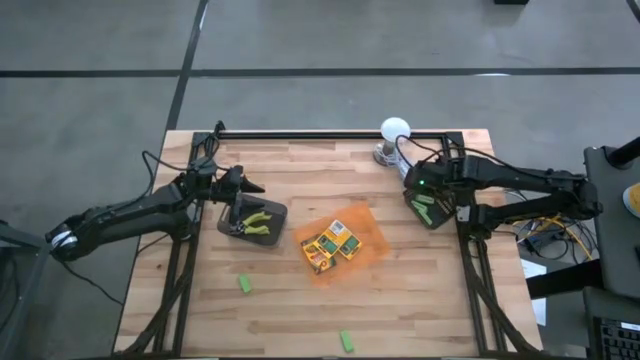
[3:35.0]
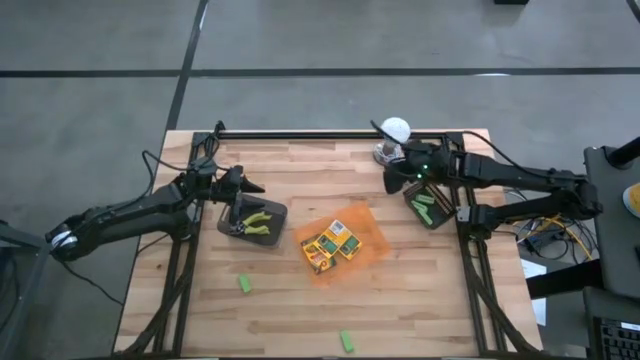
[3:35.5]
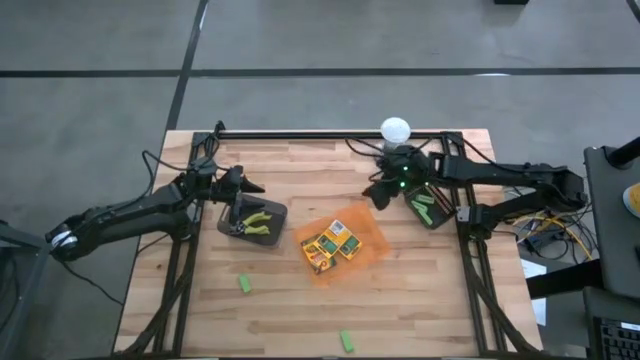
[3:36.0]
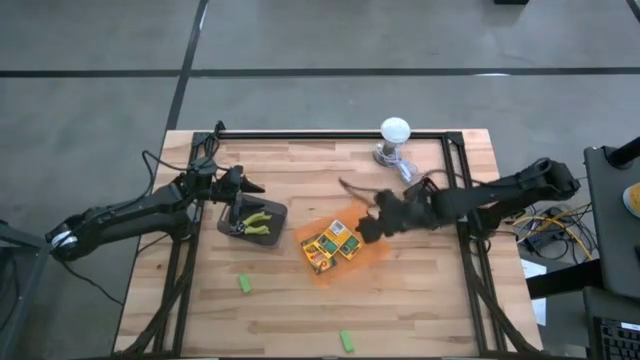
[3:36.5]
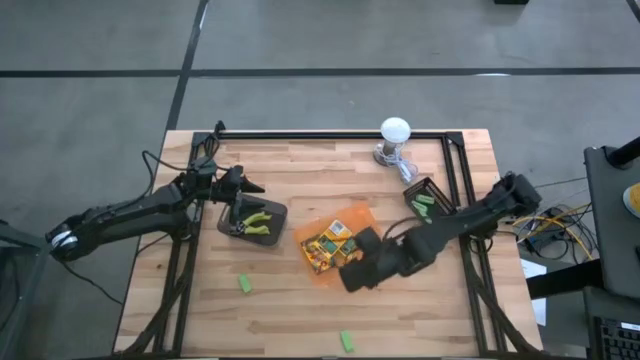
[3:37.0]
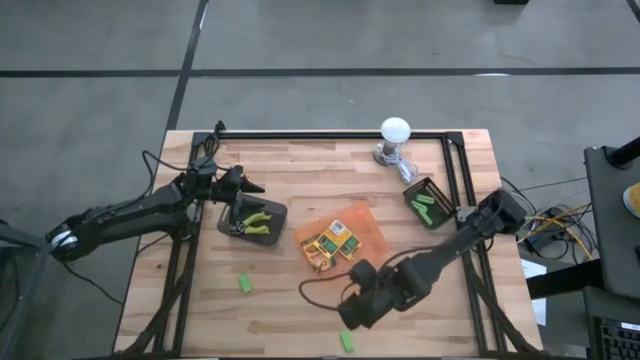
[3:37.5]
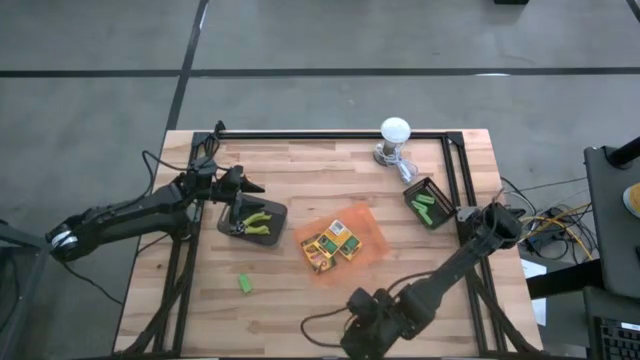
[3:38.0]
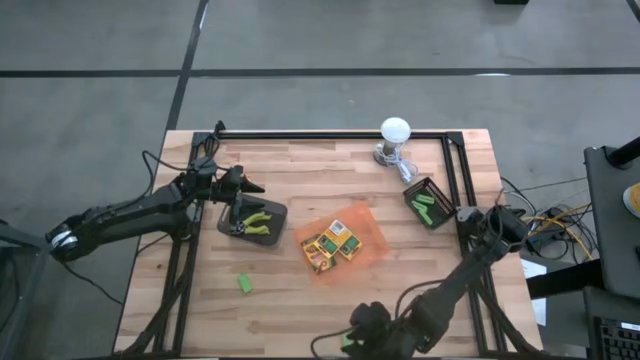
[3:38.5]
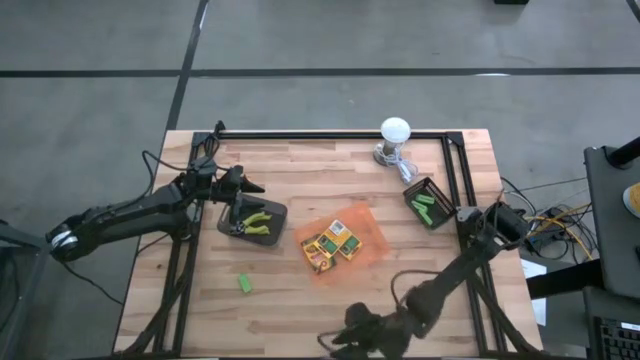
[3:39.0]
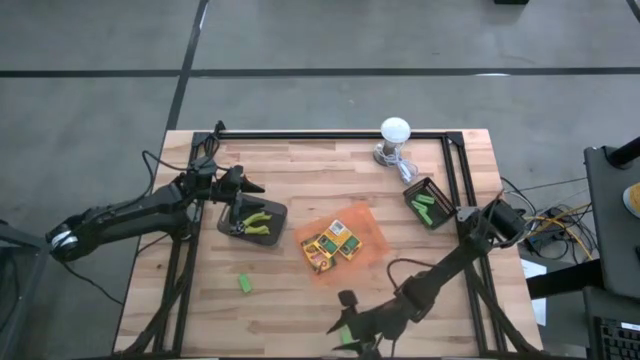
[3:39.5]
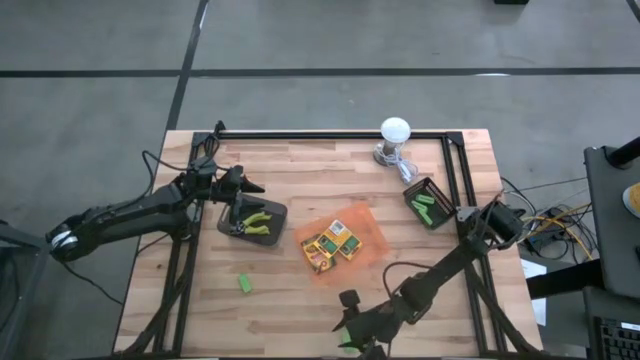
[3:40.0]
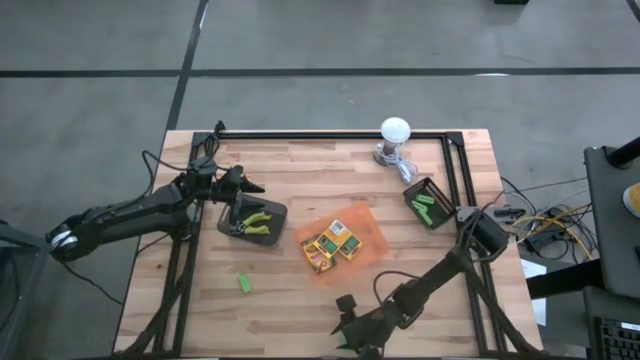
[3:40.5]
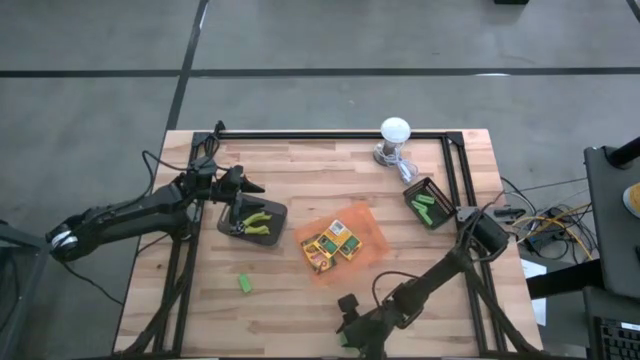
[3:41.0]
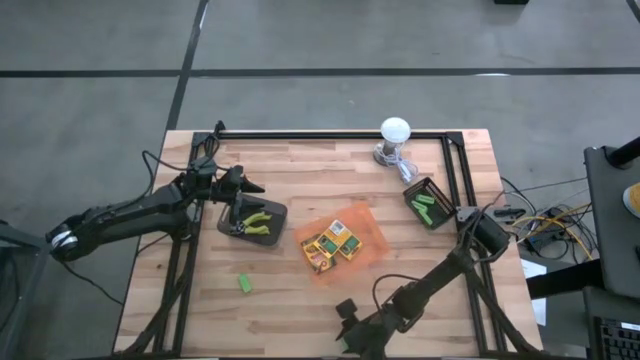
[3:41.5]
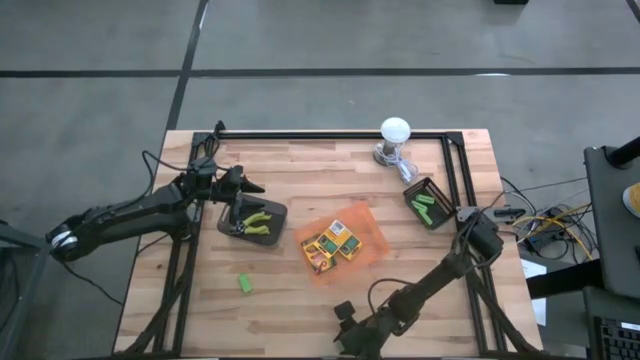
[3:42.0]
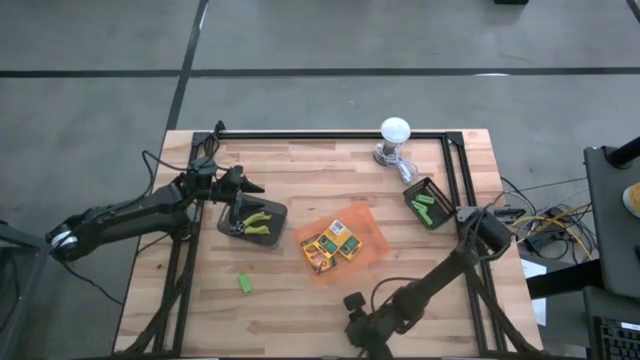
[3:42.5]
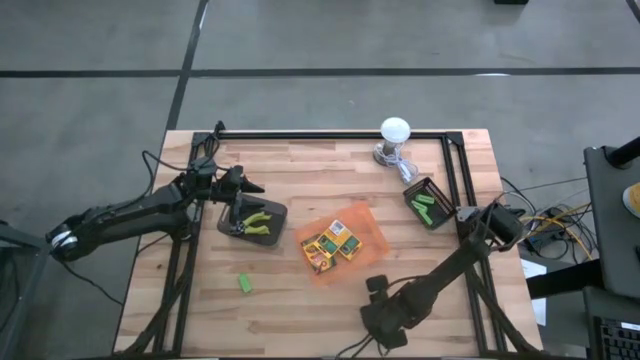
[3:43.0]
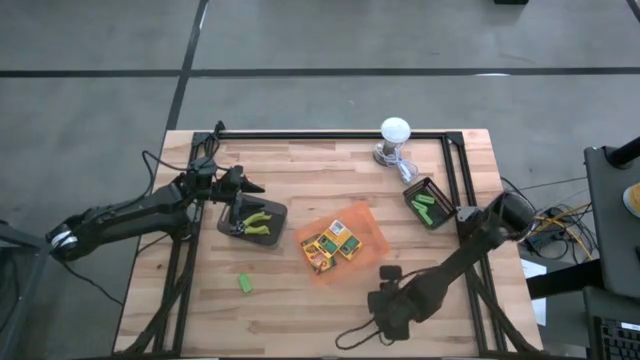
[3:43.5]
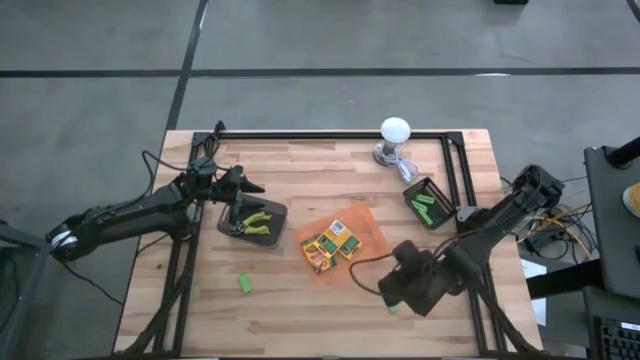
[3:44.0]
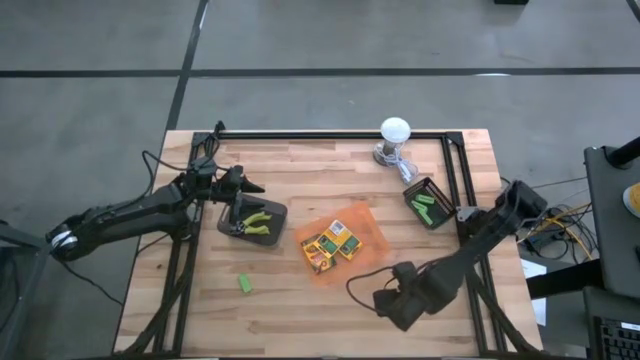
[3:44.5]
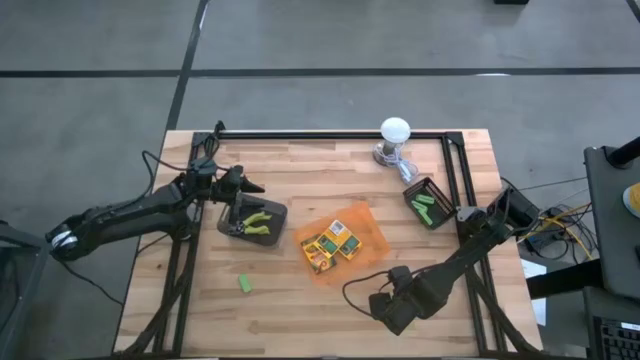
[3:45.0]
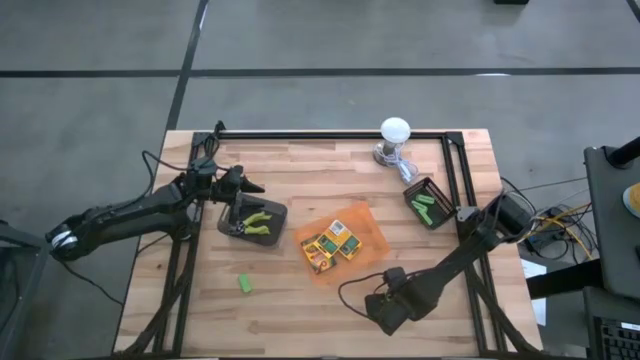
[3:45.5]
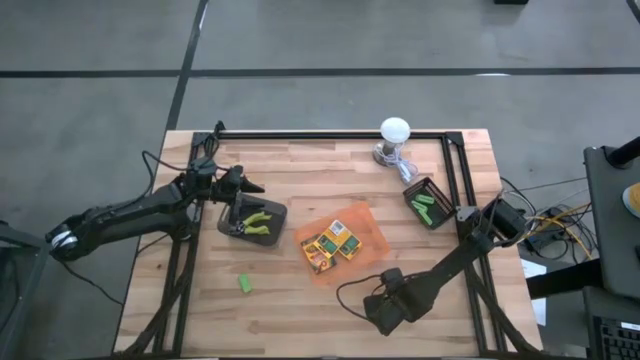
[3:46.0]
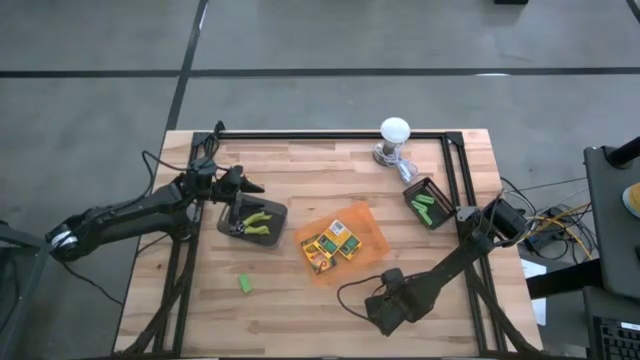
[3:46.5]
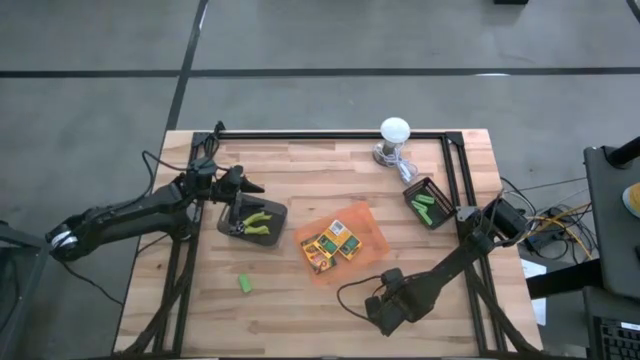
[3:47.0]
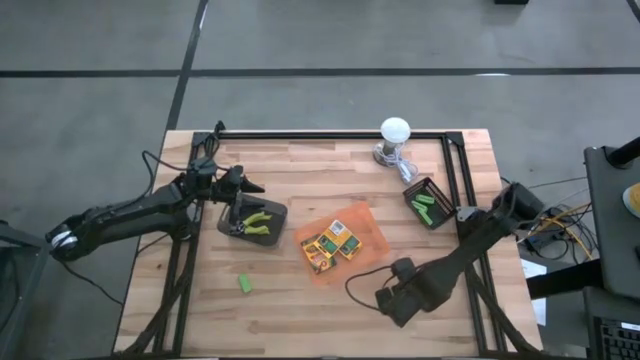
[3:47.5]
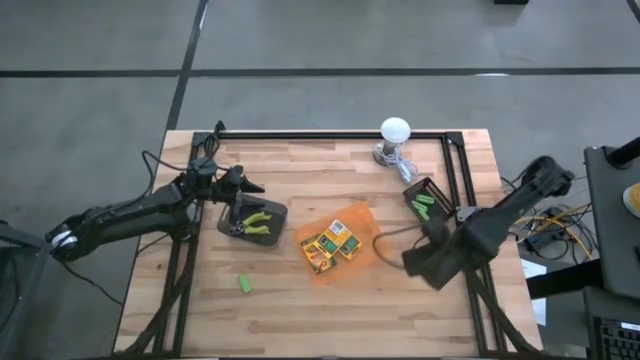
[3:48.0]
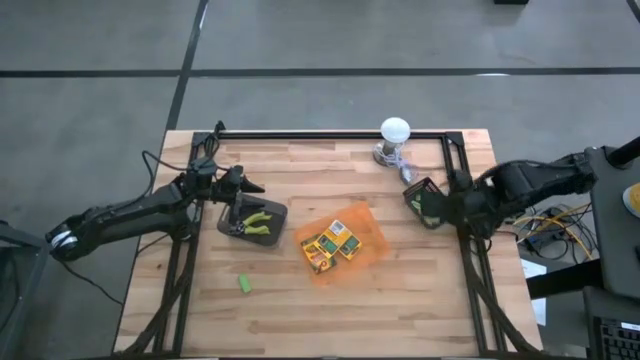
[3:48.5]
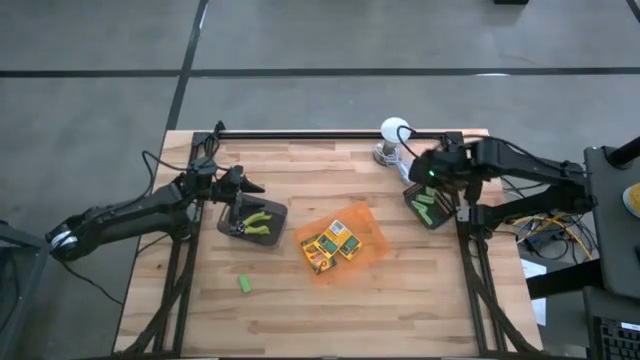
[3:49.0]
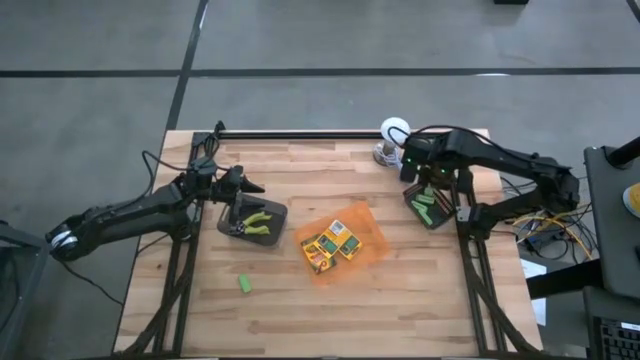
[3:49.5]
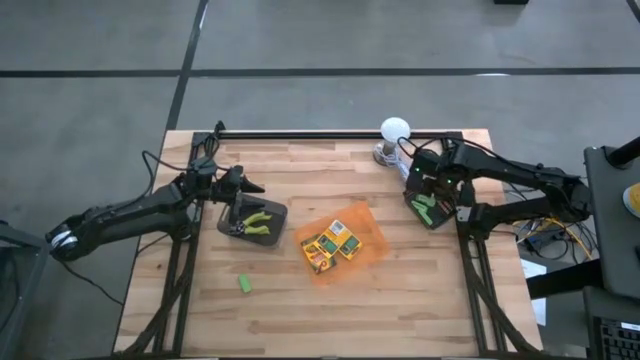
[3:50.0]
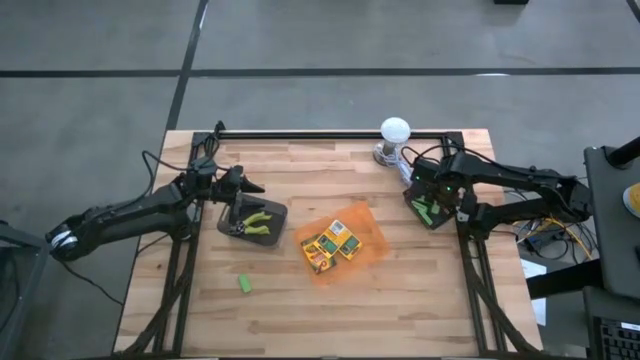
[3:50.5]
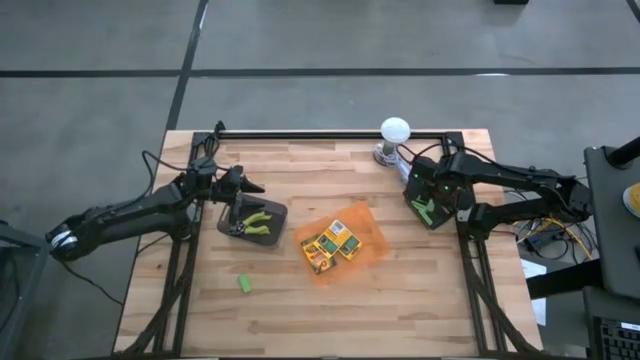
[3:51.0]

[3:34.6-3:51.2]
Task: Pick & Place School Supplies
Put the right green eraser into the black basket

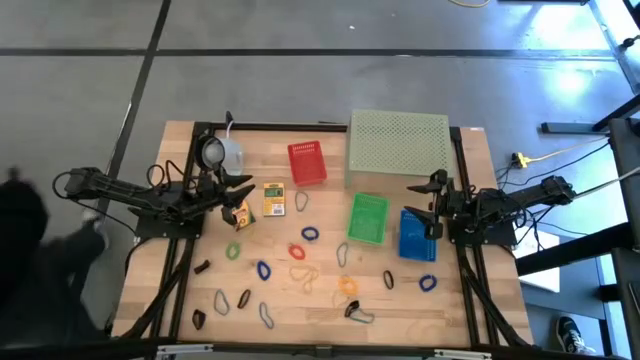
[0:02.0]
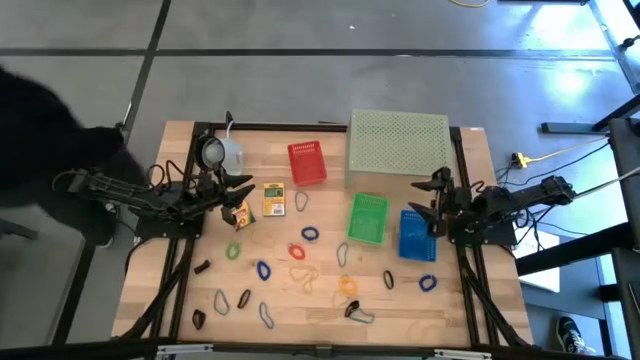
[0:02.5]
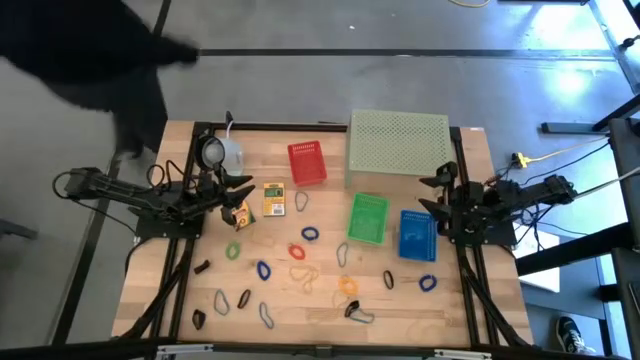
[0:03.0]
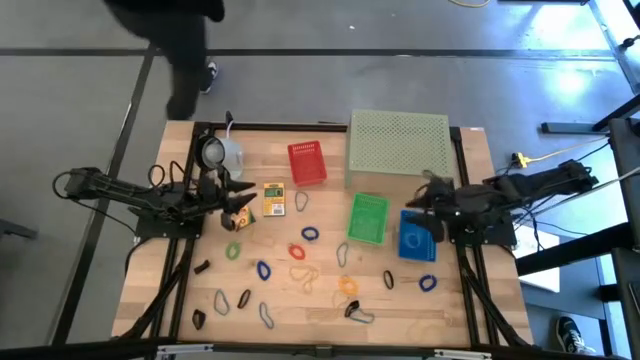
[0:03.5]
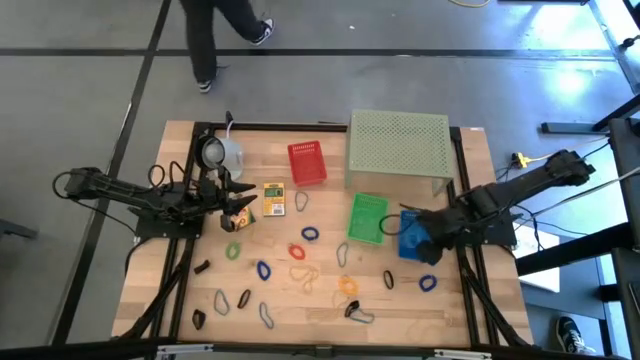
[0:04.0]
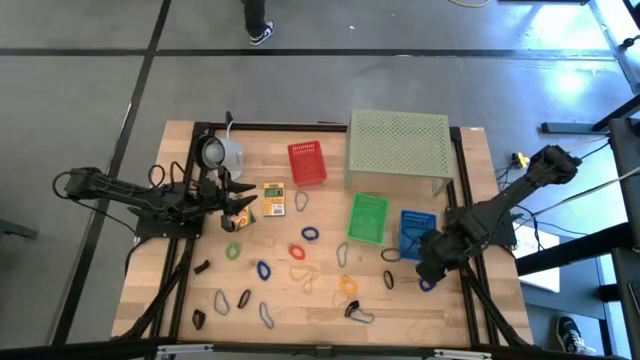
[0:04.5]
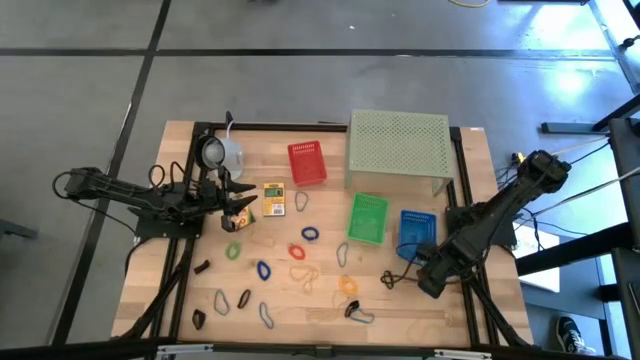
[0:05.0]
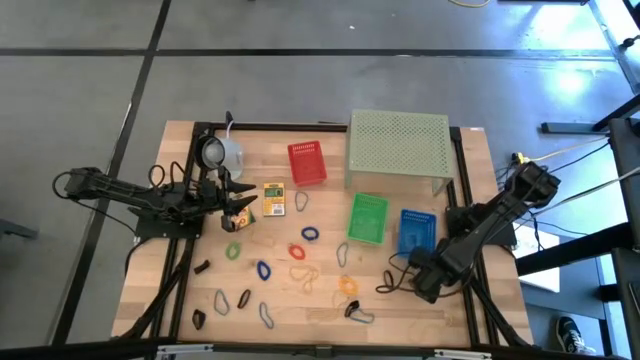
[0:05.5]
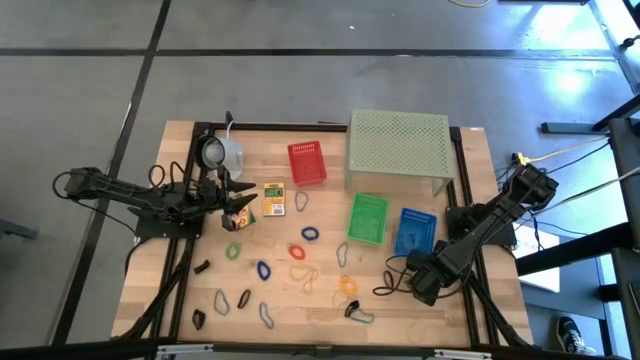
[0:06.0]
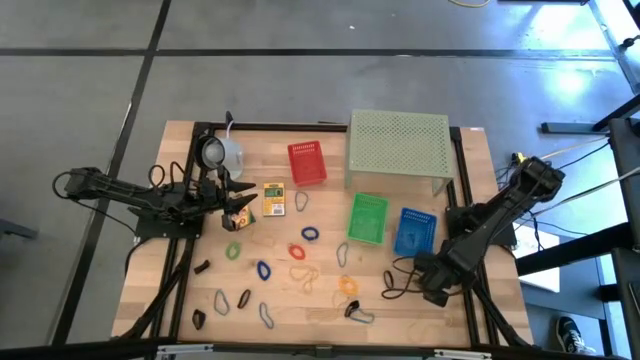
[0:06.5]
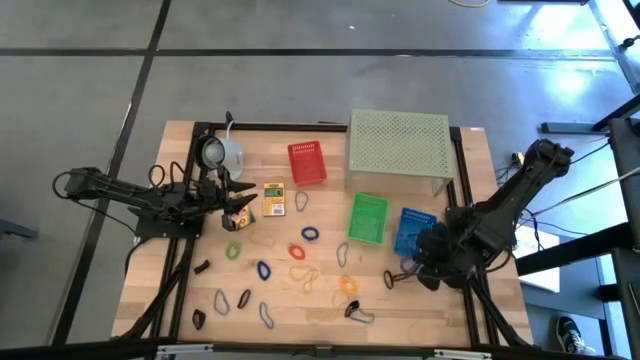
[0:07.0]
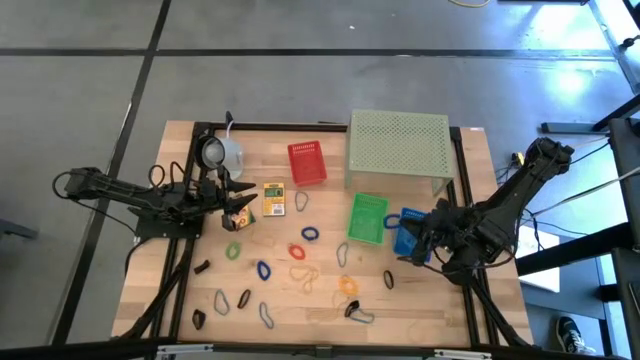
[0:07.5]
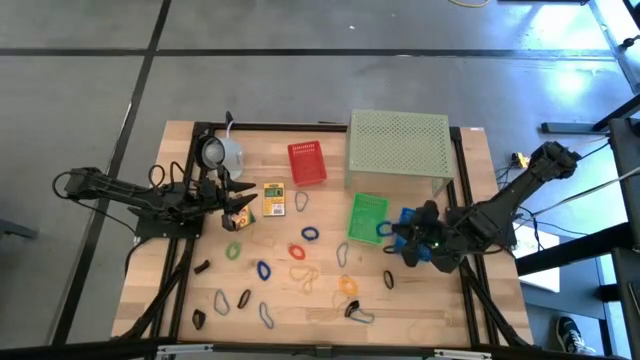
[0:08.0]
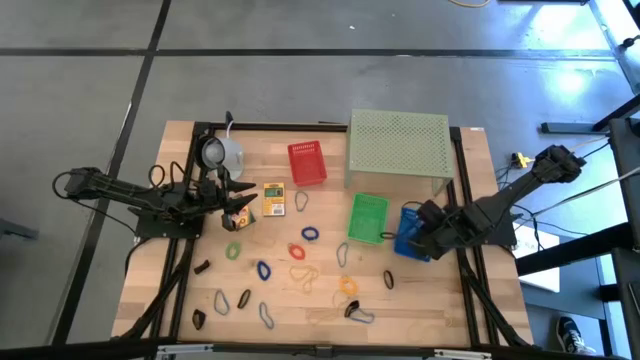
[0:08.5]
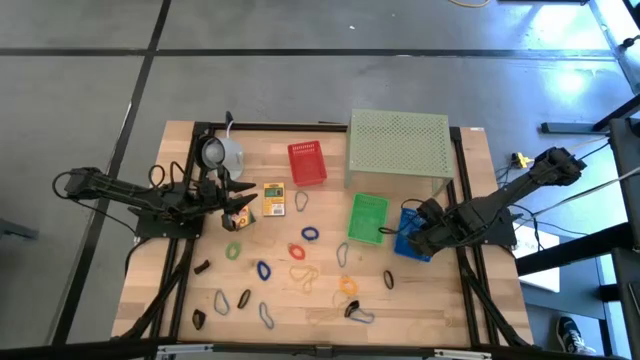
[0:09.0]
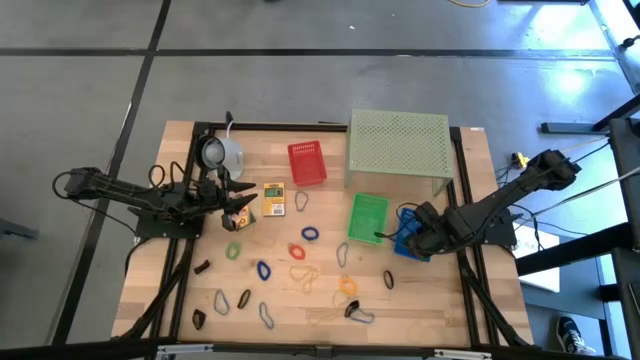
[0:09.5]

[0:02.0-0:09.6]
Task: Pick & Place Office Desk Supplies
Put the blue spring keychain into the blue bin
